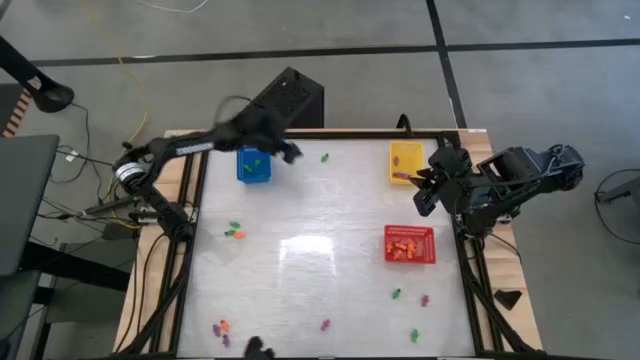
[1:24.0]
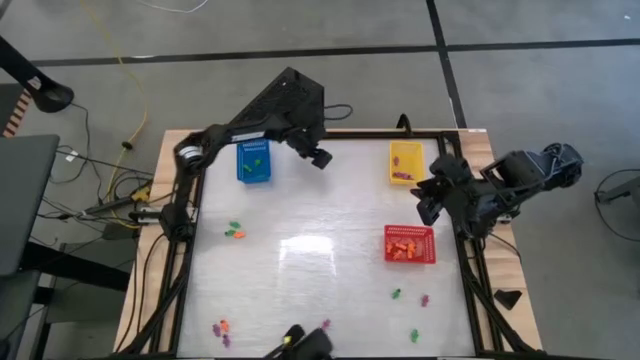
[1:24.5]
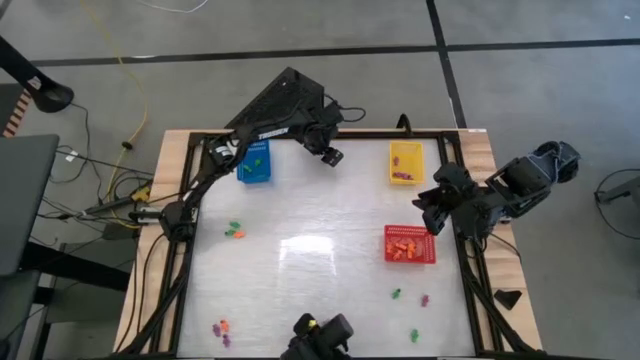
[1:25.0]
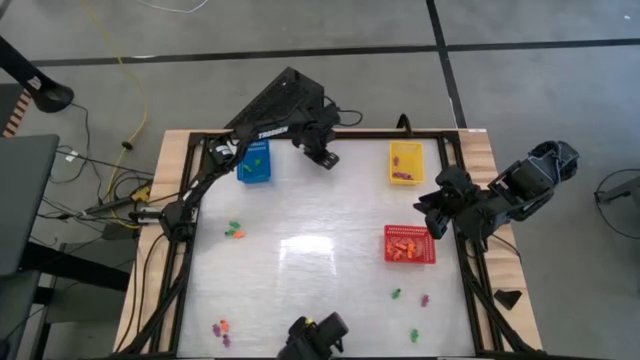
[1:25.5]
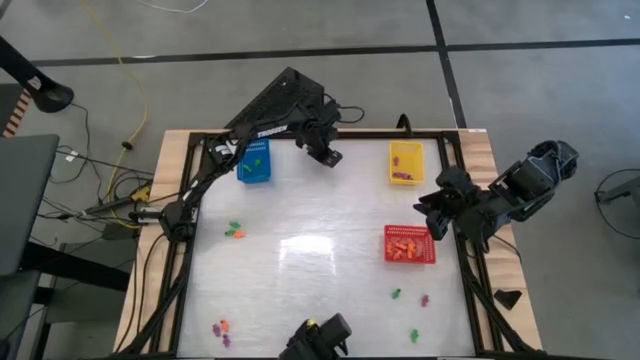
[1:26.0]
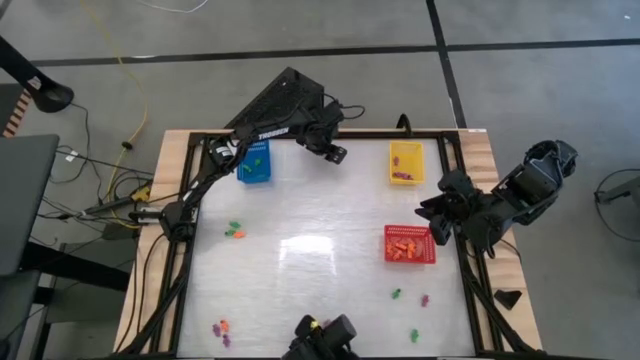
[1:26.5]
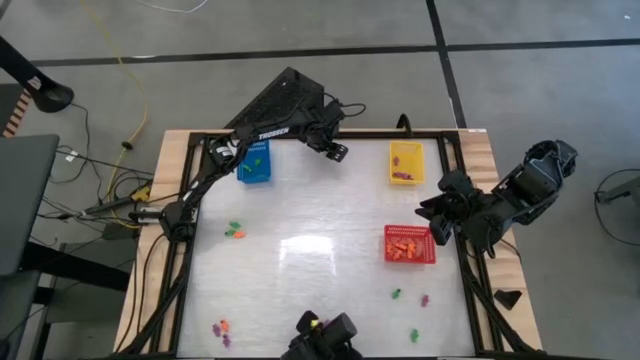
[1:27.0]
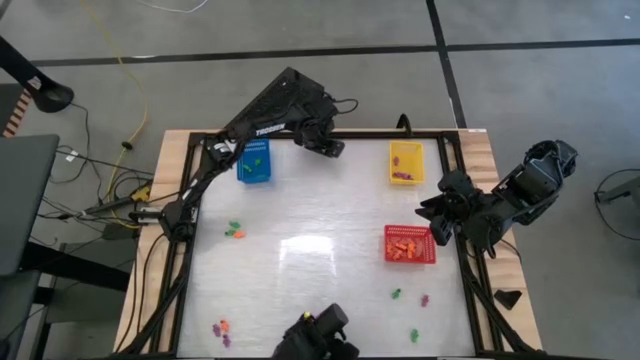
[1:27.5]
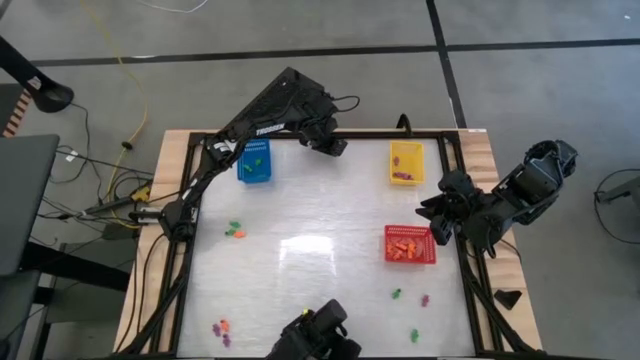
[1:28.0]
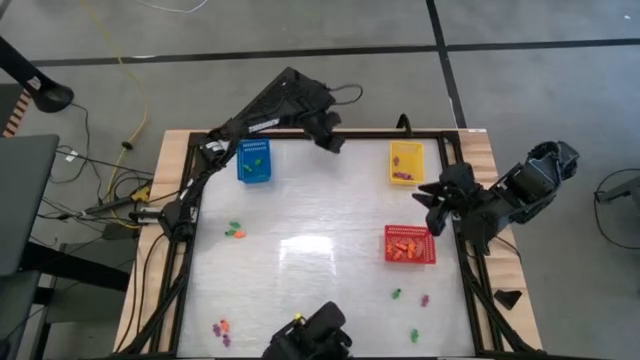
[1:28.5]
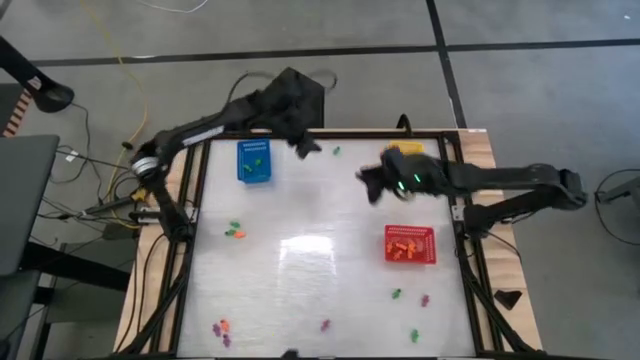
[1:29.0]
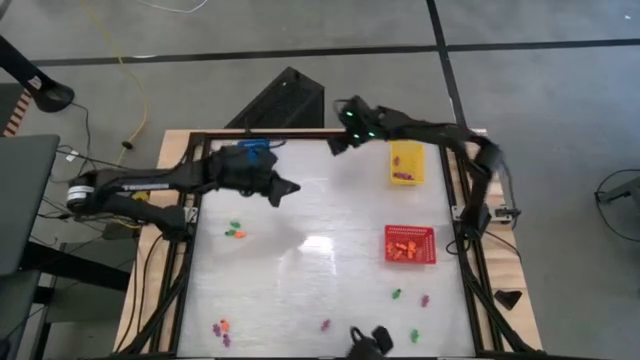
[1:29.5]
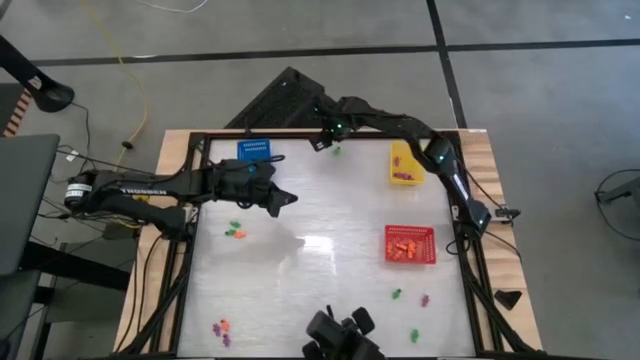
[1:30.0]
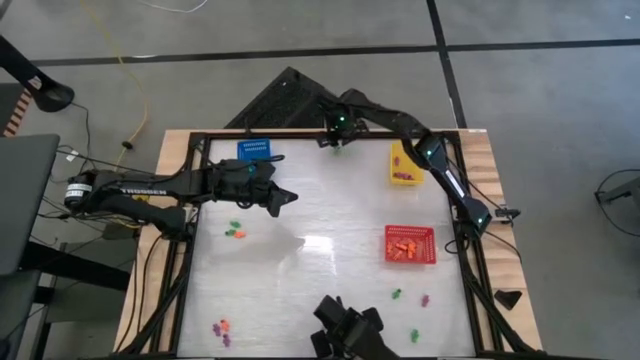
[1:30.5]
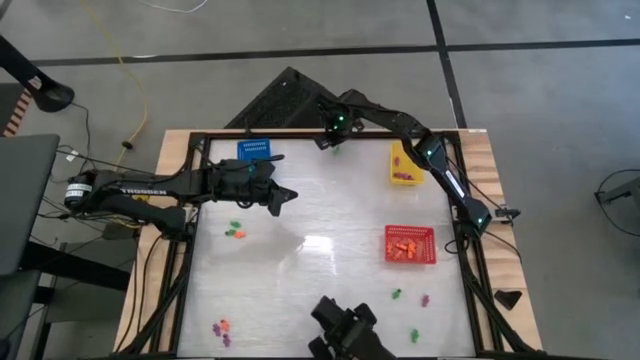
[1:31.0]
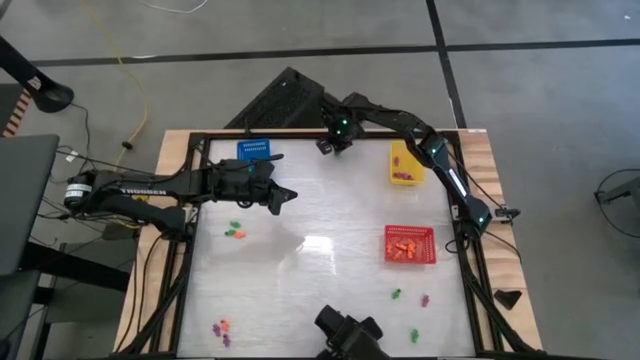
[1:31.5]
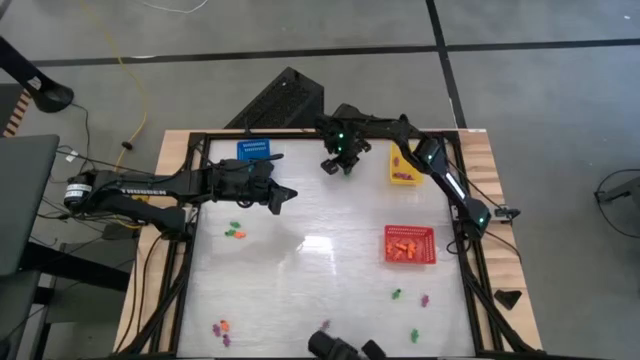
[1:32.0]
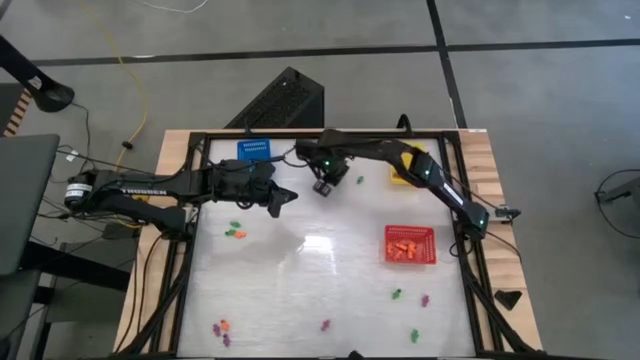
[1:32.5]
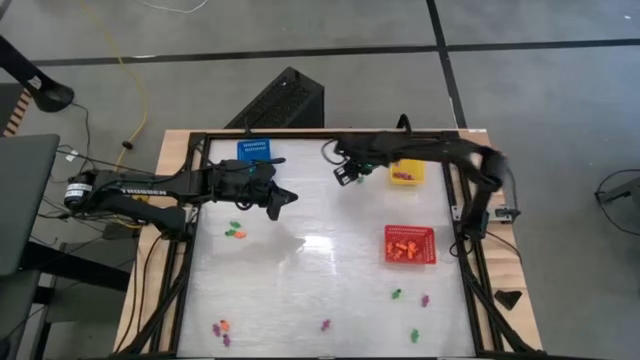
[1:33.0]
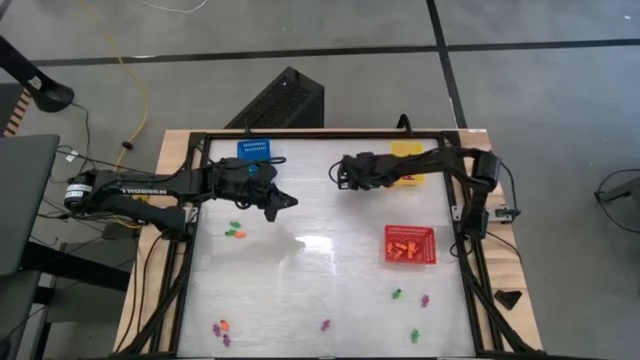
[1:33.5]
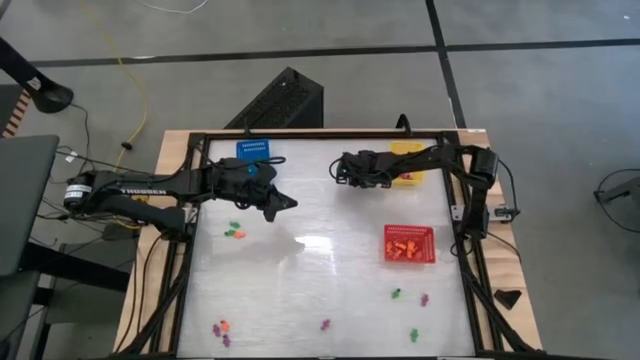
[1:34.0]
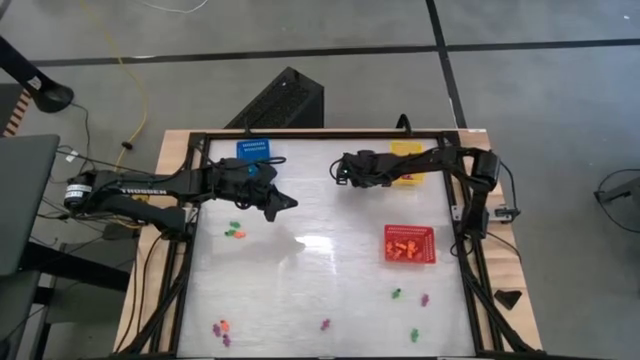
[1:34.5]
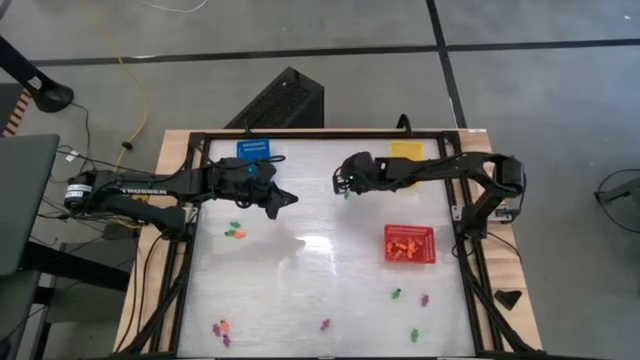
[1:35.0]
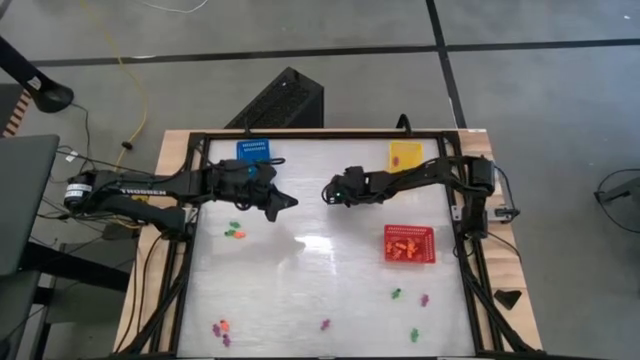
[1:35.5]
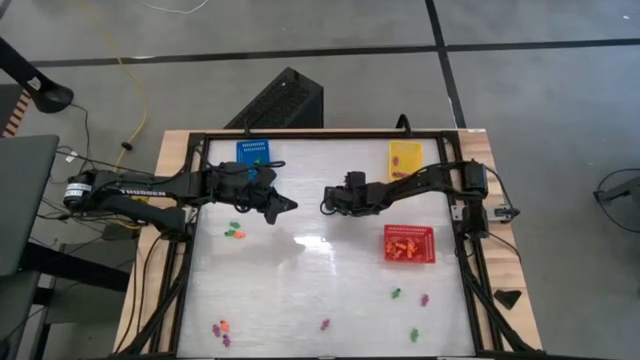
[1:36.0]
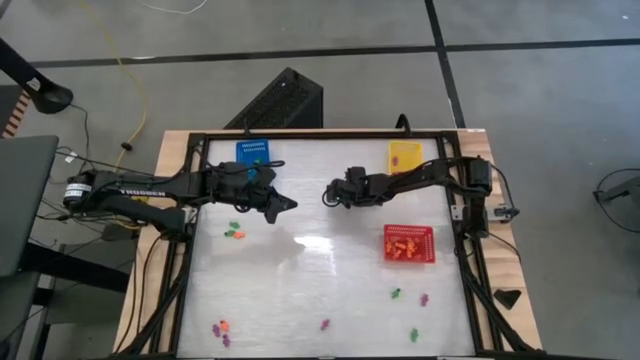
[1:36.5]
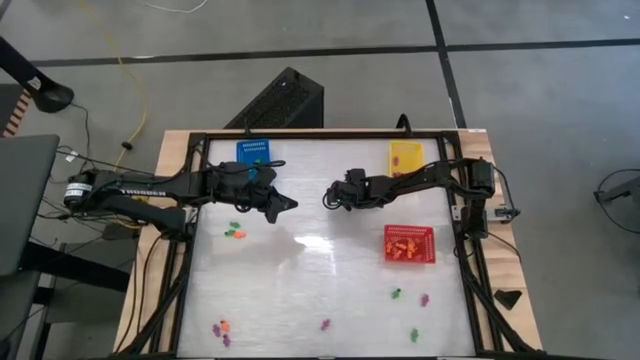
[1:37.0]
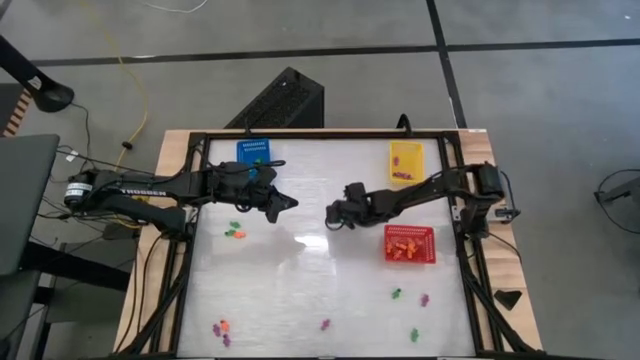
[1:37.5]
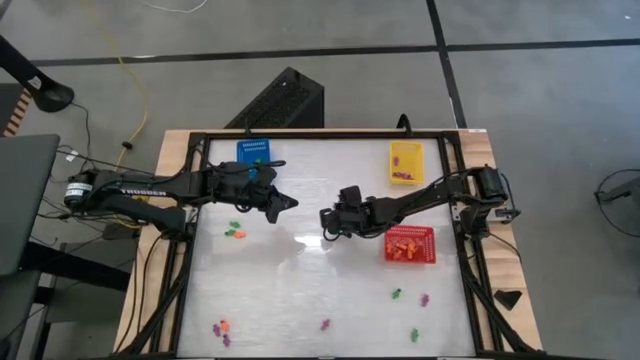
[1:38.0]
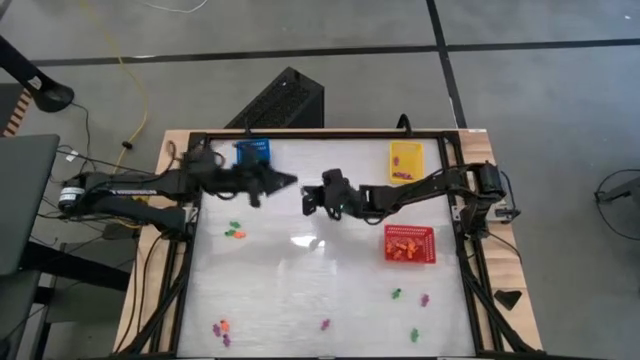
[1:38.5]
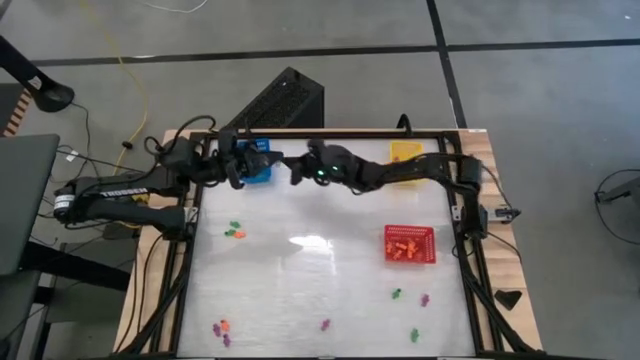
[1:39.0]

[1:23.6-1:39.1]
Task: Sort Halloween decoration
Put the green skeleton toy into the blue bin

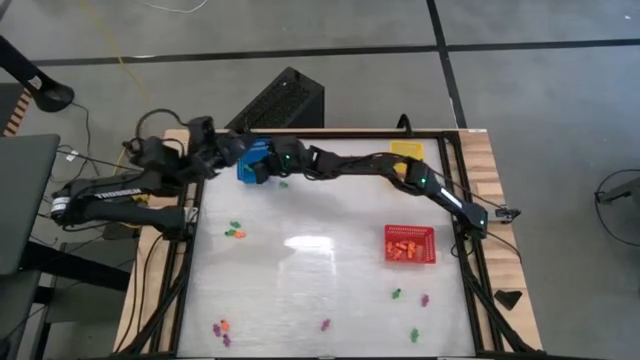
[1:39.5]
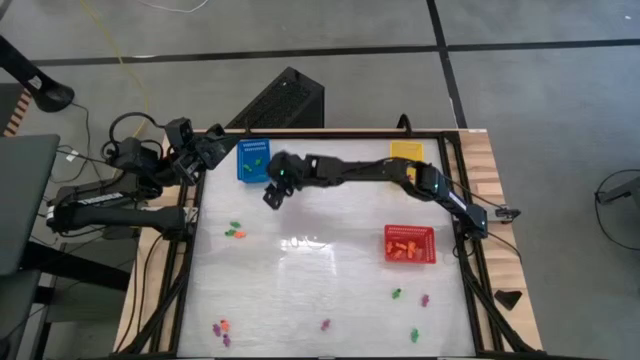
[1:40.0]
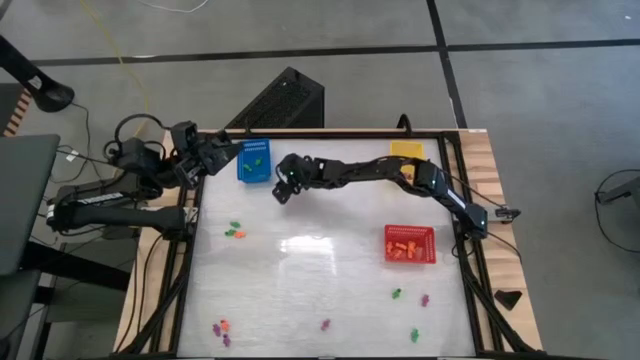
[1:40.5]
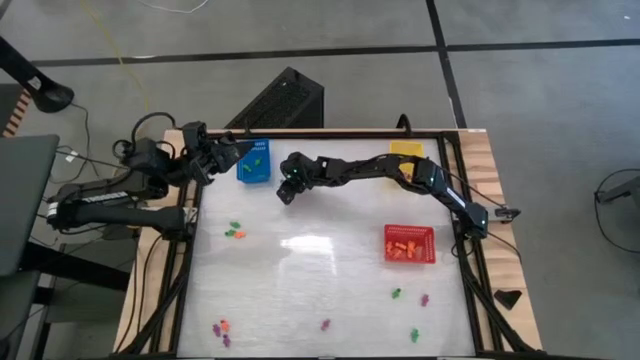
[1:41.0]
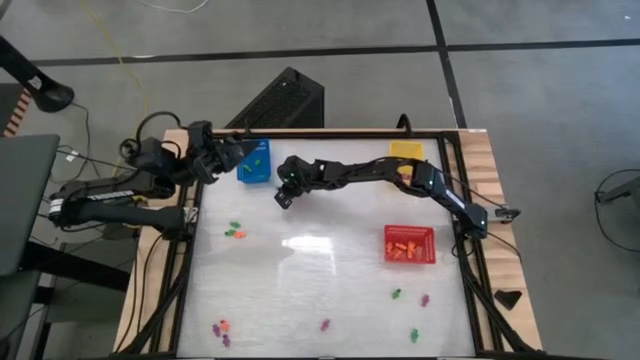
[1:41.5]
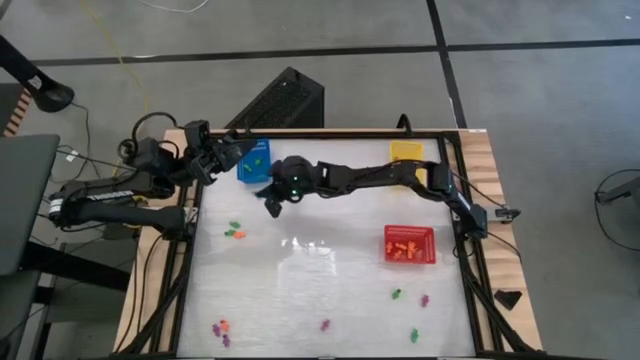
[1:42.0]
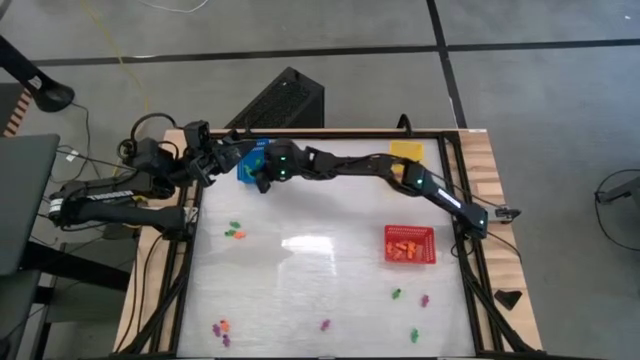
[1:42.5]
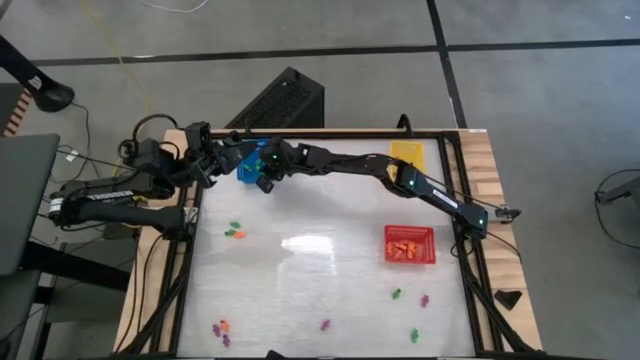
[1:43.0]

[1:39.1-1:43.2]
Put the green skeleton toy into the blue bin

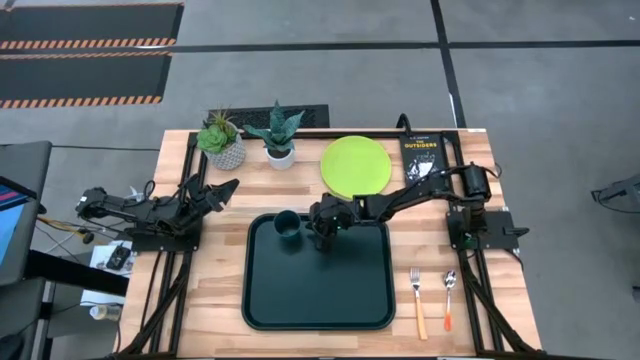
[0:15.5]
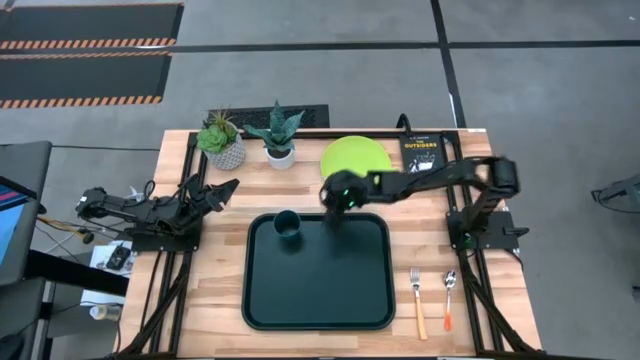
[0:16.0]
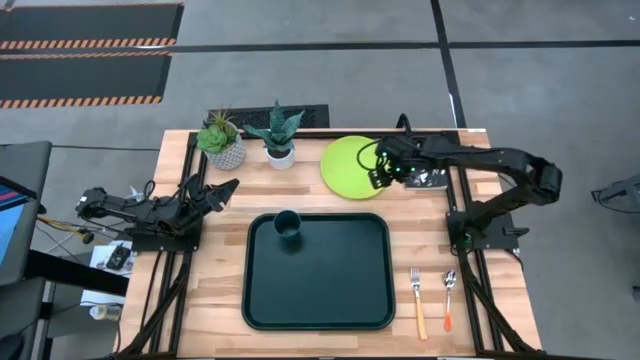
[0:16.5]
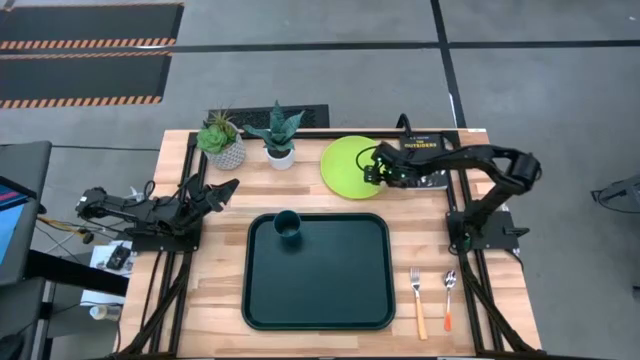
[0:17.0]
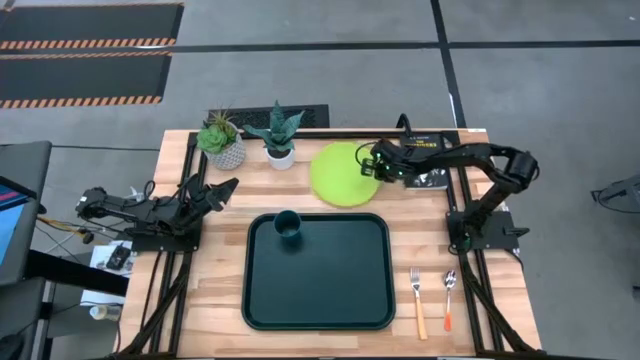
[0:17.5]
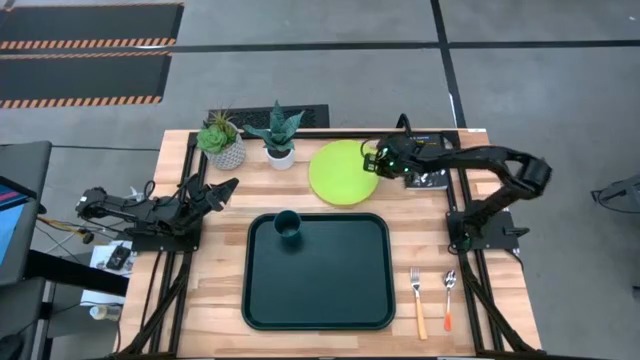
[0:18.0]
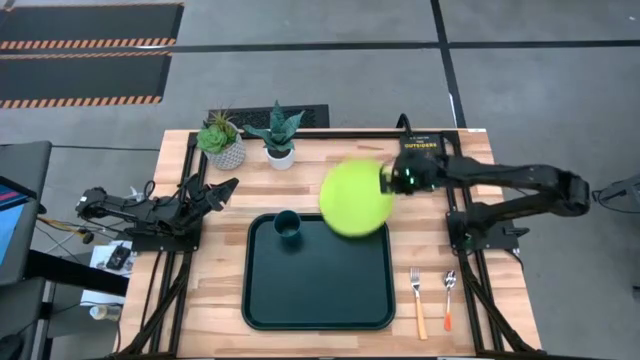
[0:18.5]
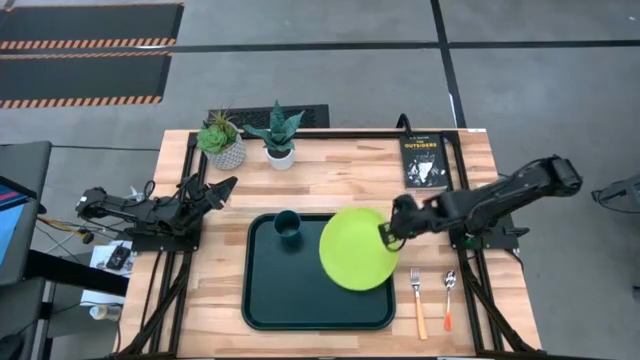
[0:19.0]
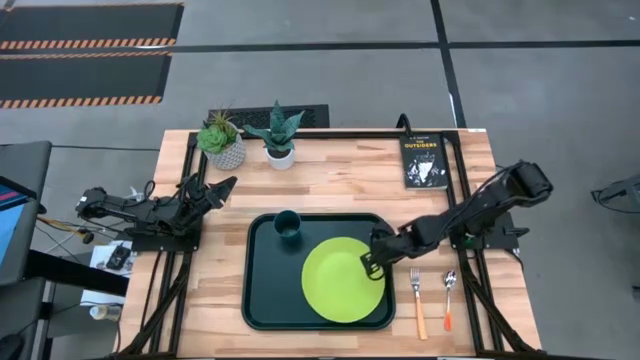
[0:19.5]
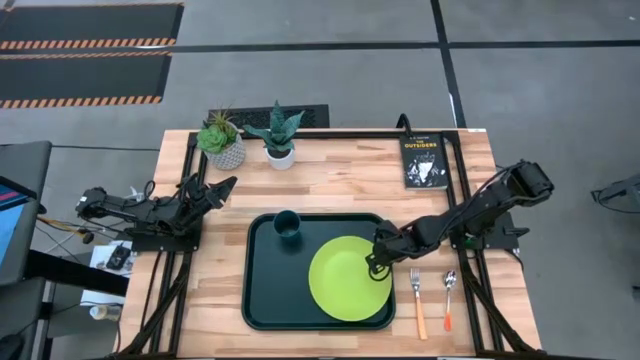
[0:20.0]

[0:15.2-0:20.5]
Task: Pick and place plate/cup/fork/spoon on tray
Put the light green plate on the black tray to the bottom right of the dark green cup
